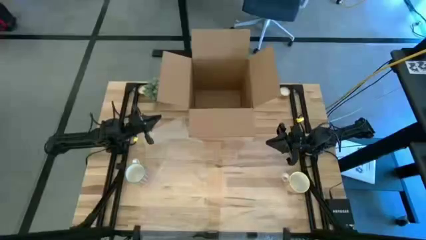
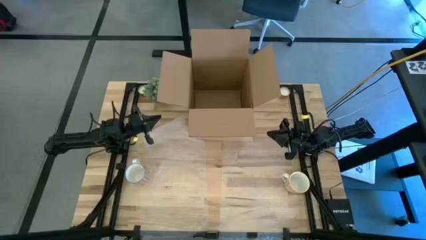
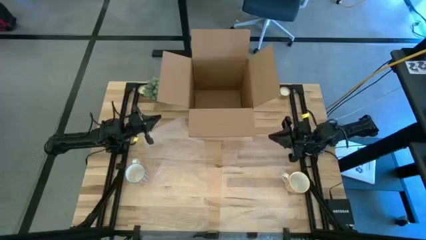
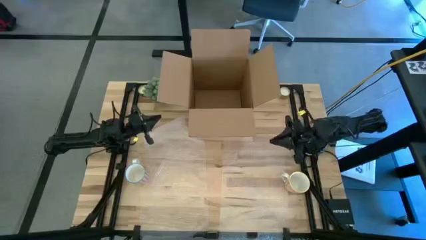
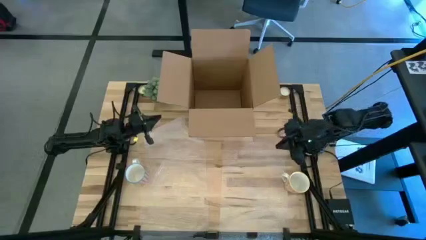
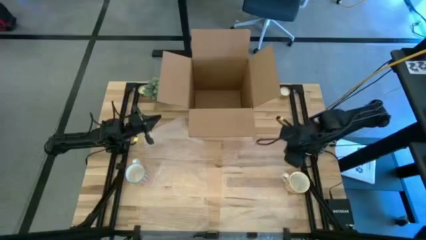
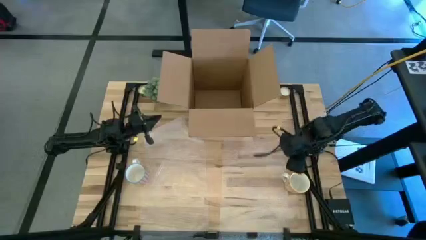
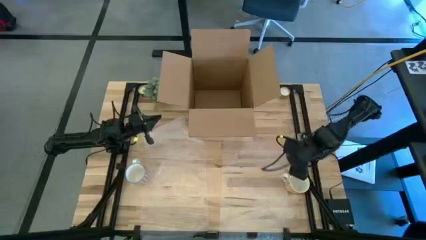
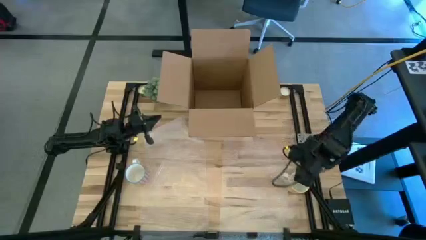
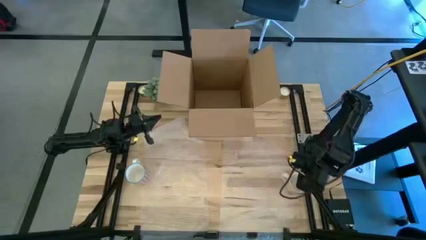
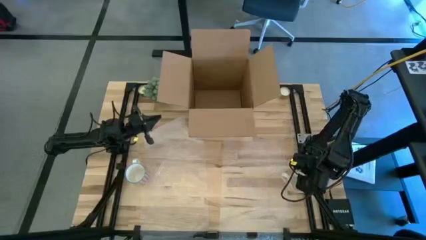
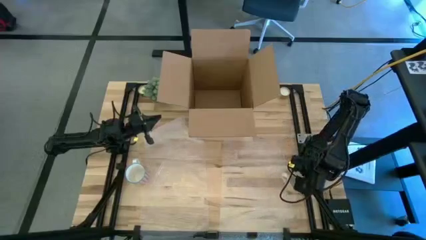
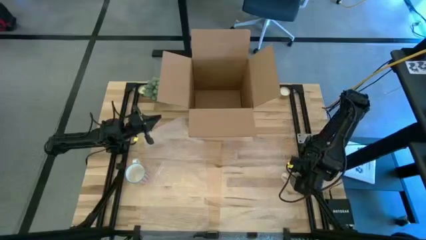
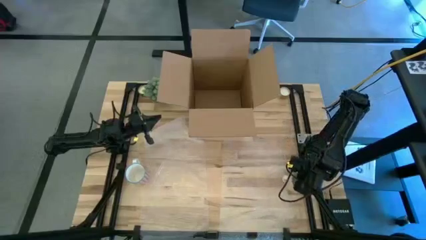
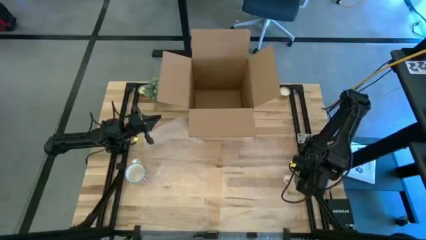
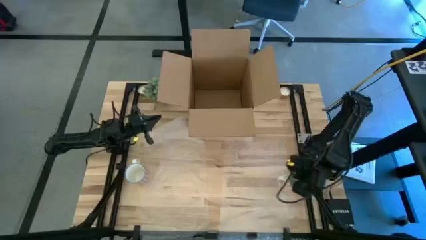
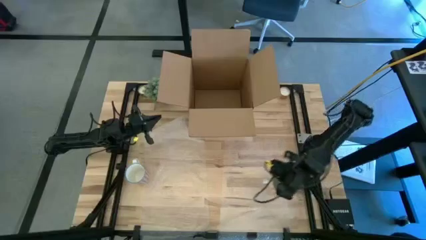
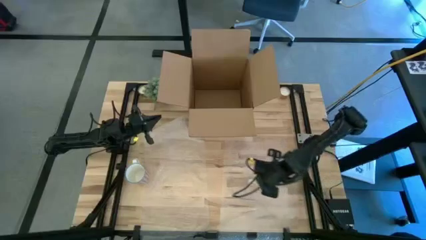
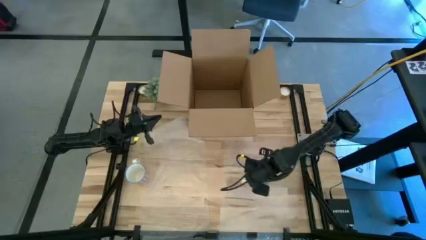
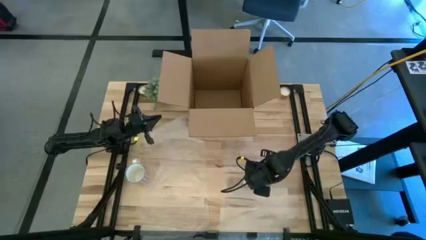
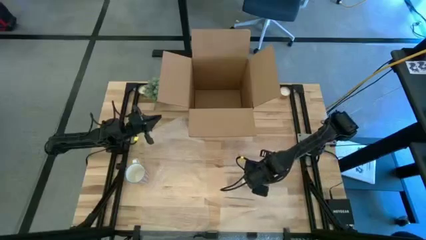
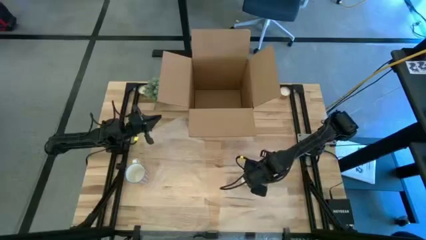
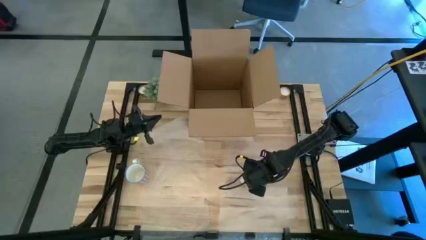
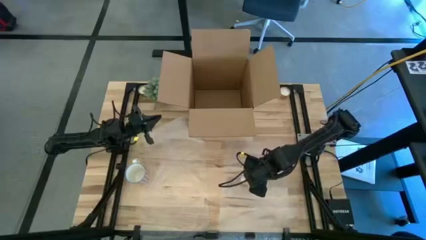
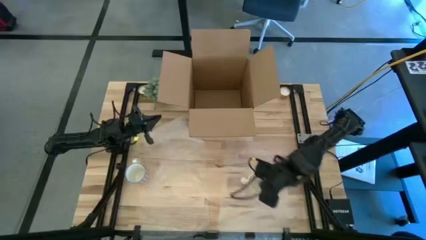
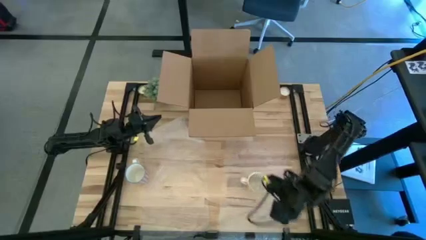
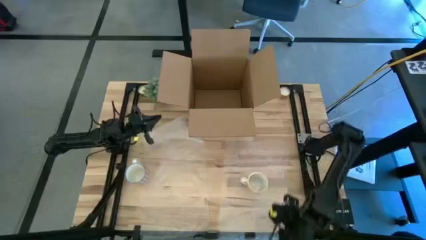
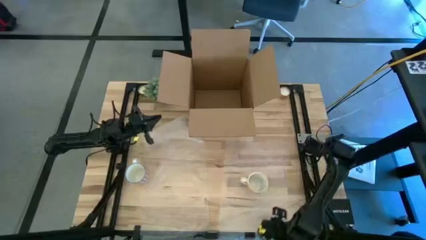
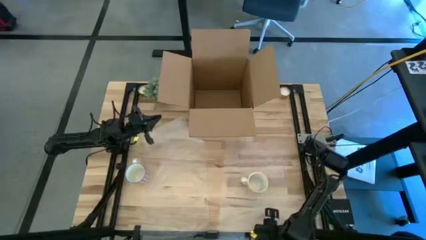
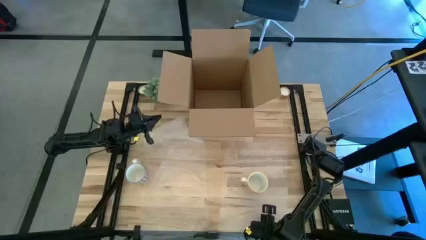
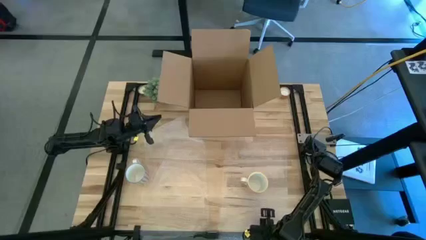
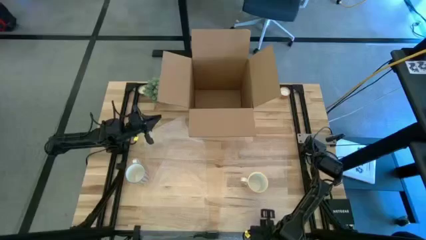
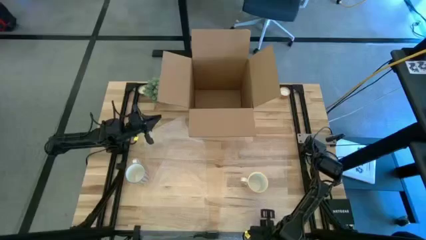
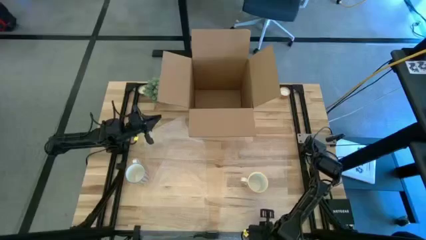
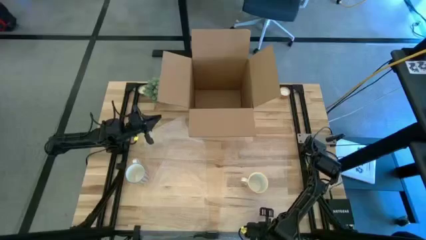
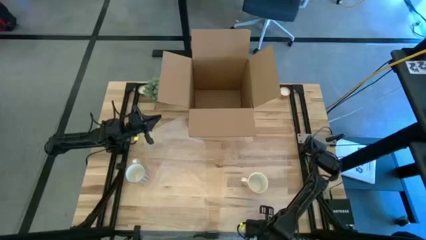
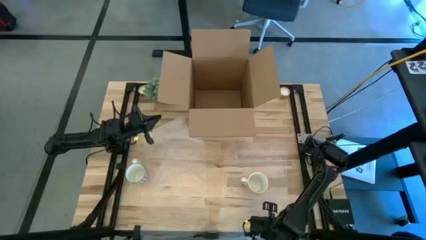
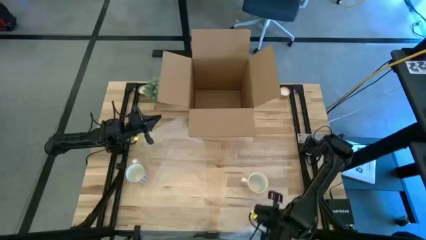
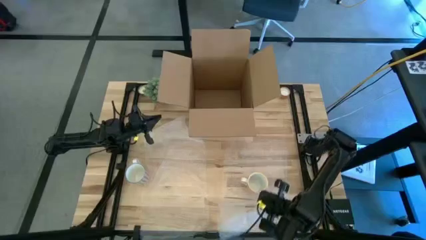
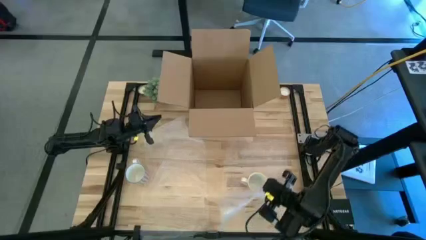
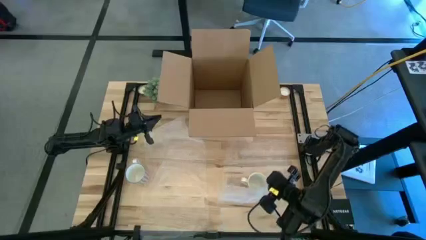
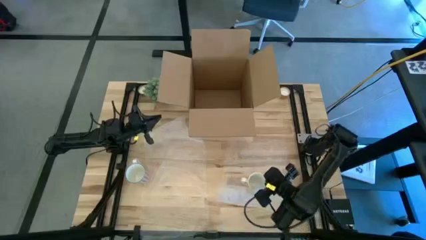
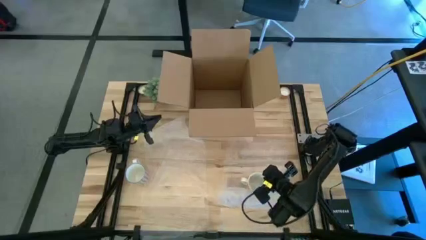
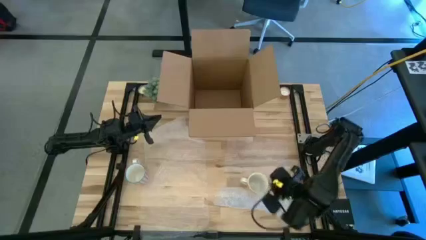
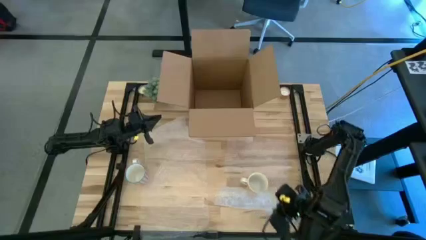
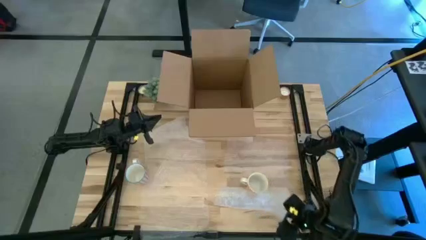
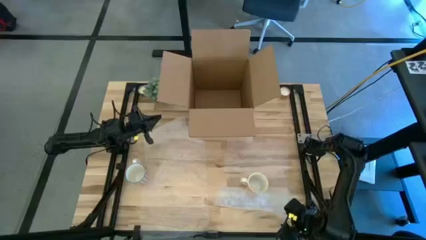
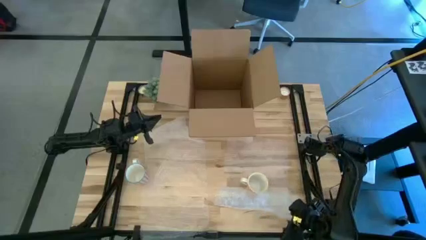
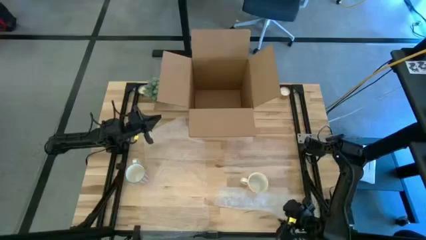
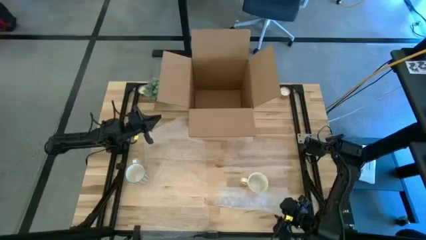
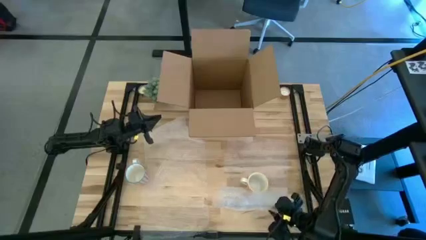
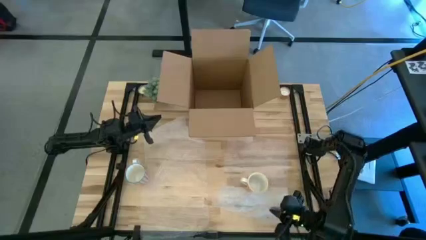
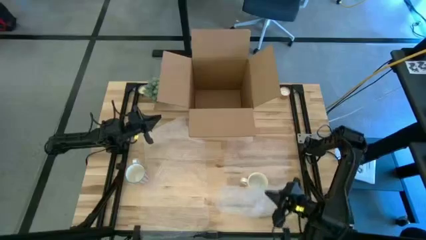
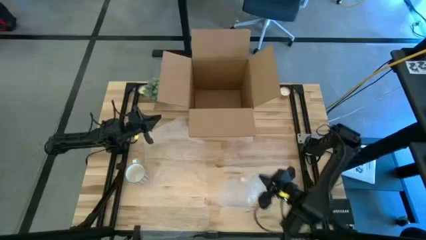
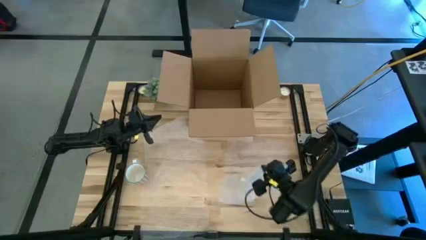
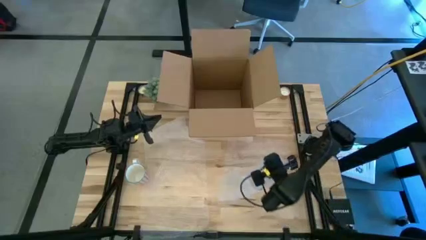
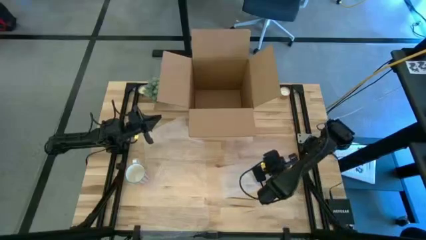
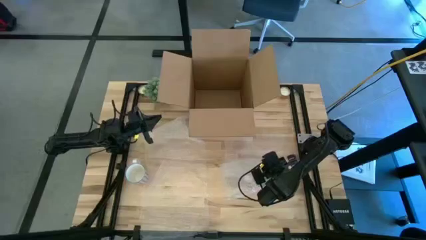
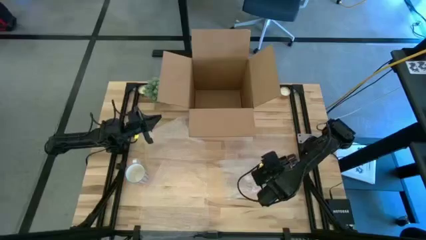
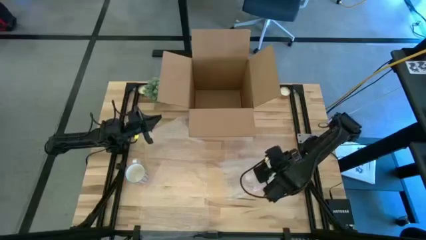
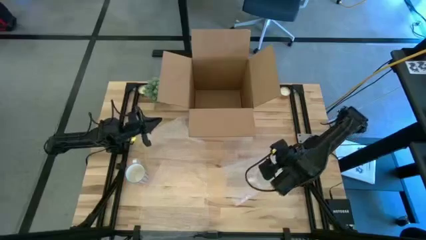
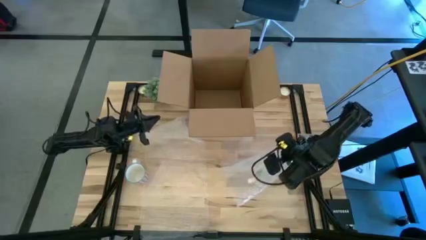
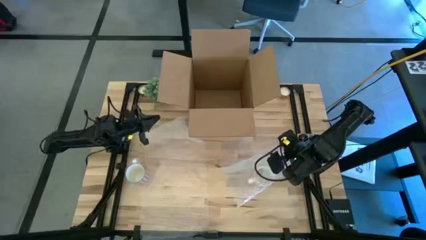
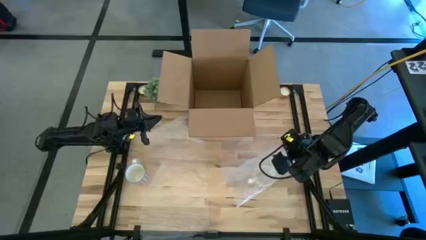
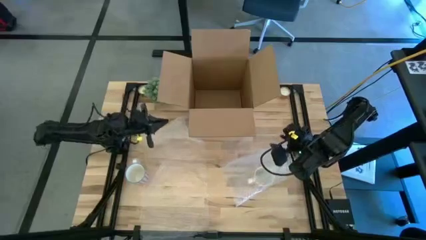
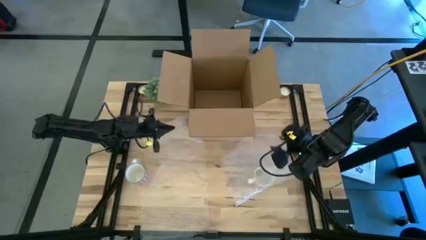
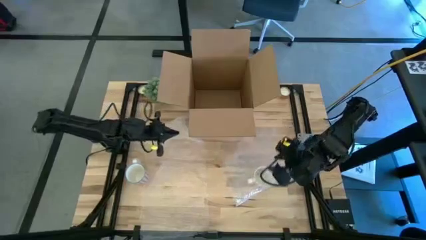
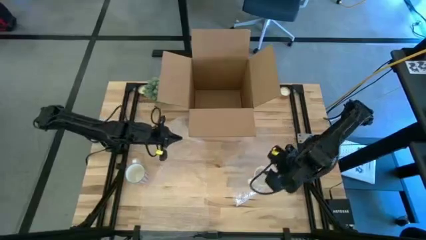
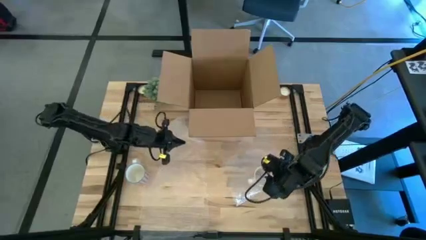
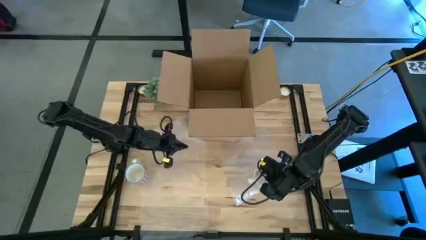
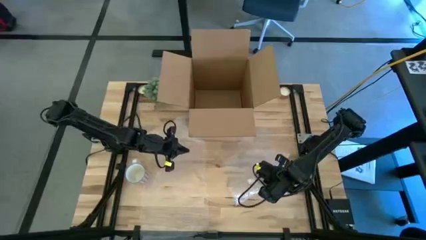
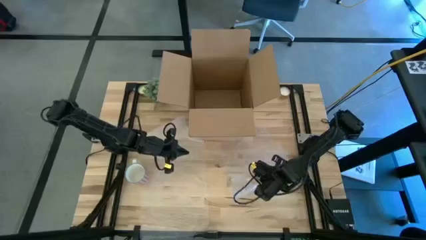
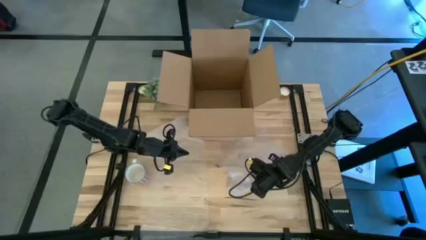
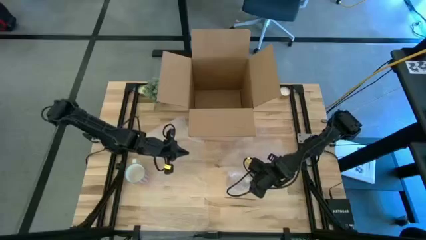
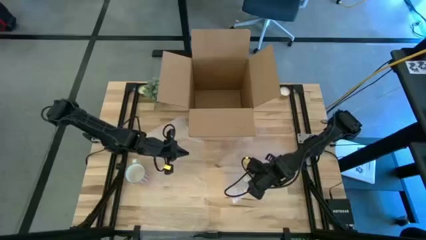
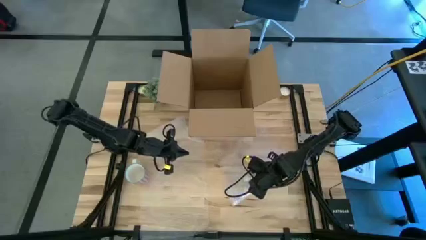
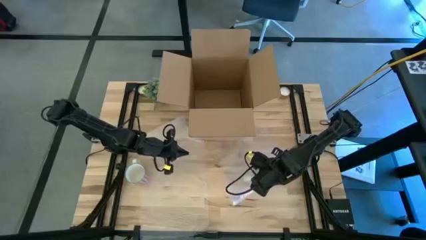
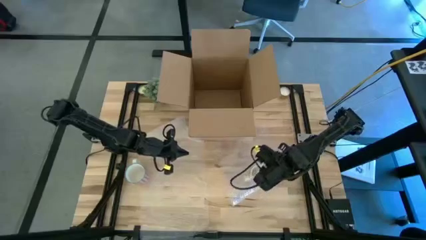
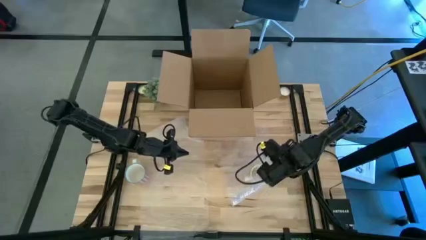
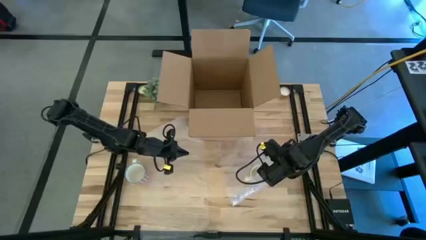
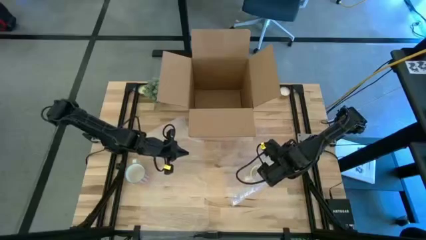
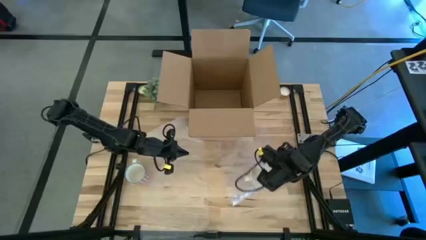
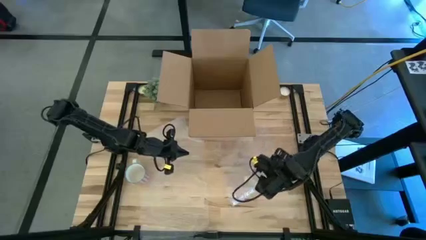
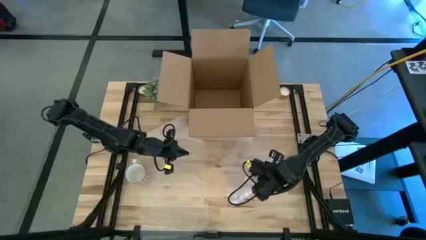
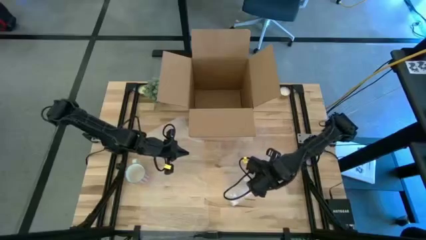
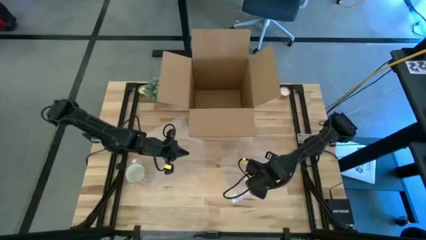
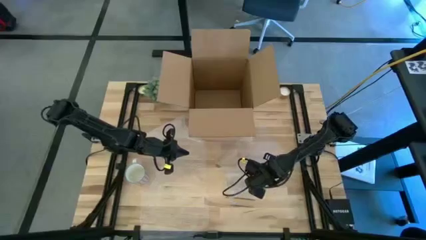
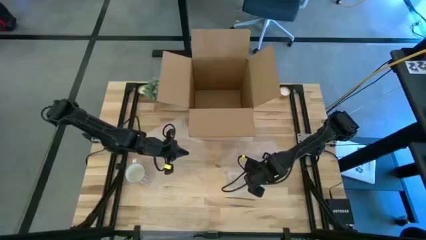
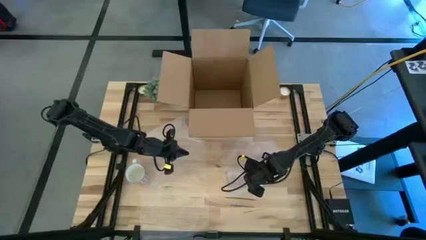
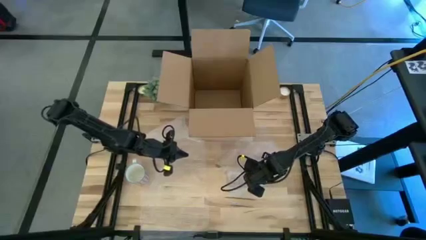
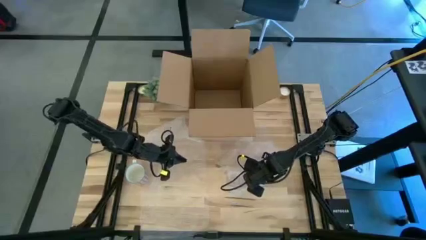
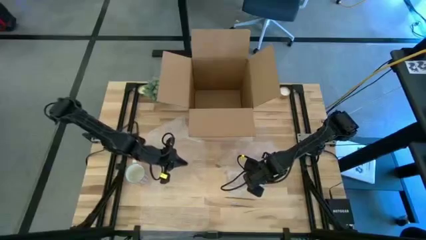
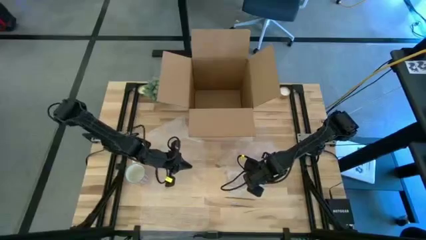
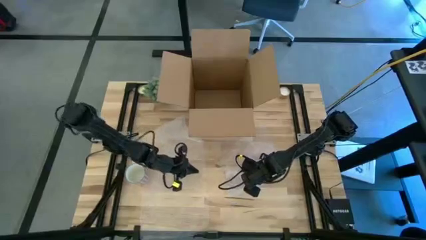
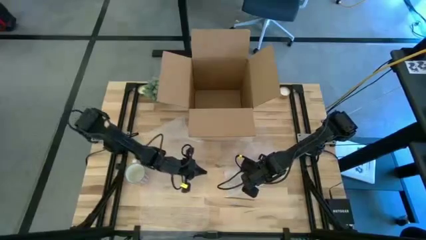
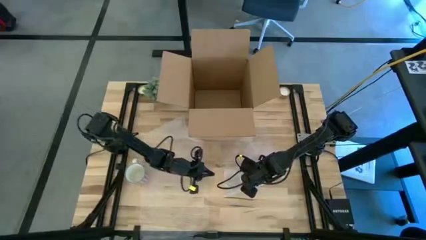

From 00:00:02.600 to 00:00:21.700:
Task: wrap mug
Wrap the orange mug with the bubble wrap
